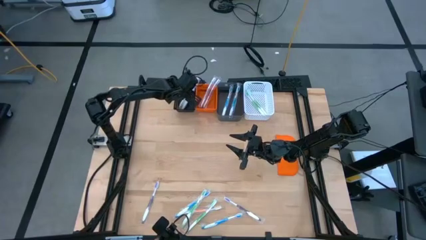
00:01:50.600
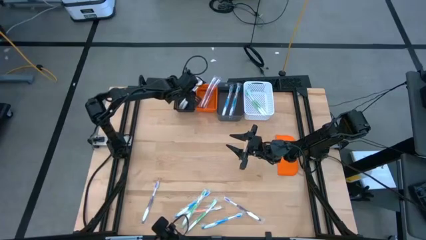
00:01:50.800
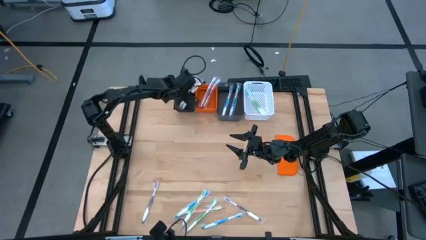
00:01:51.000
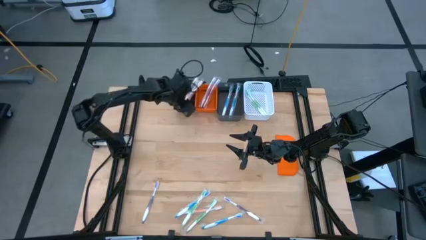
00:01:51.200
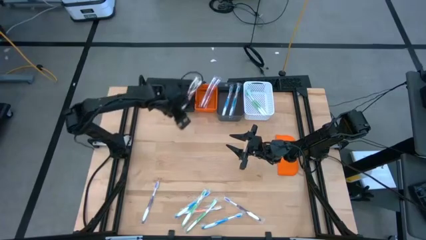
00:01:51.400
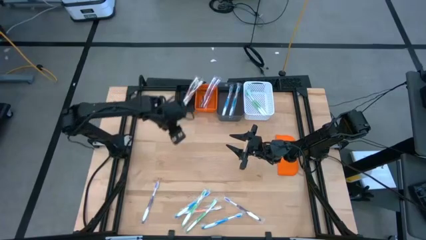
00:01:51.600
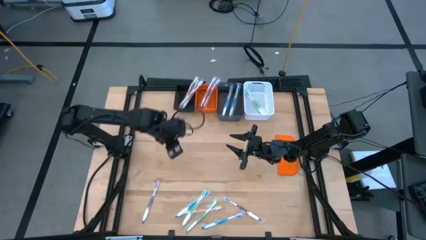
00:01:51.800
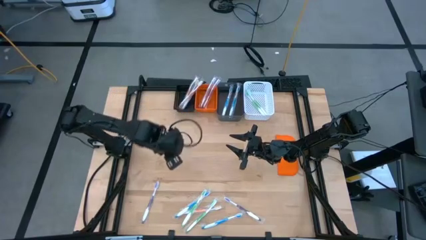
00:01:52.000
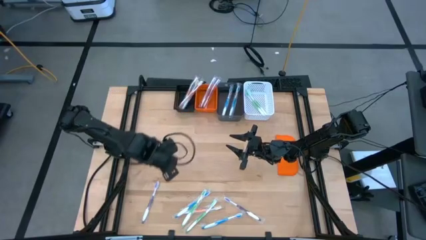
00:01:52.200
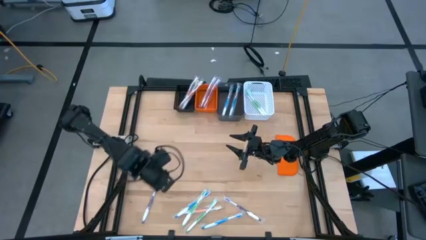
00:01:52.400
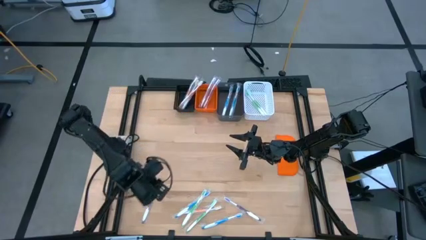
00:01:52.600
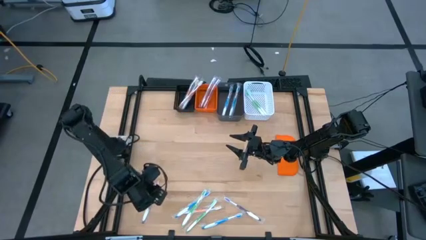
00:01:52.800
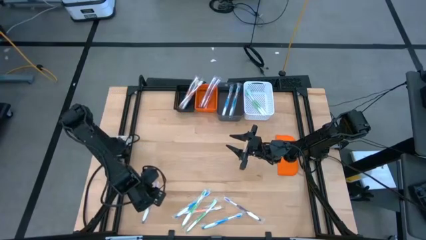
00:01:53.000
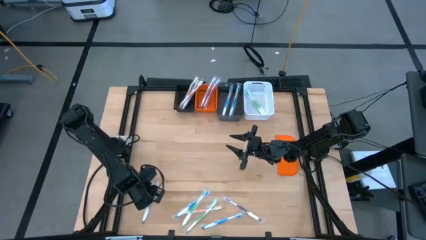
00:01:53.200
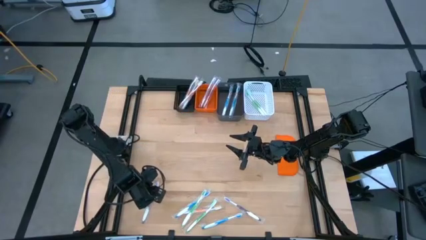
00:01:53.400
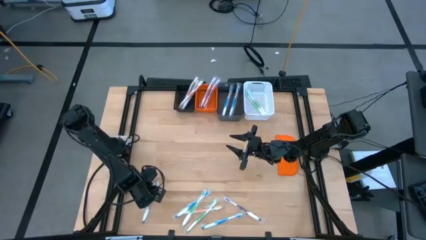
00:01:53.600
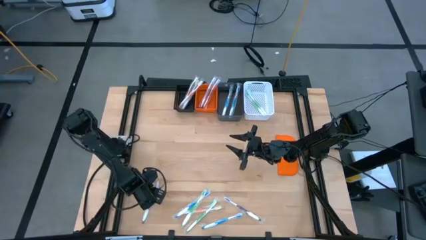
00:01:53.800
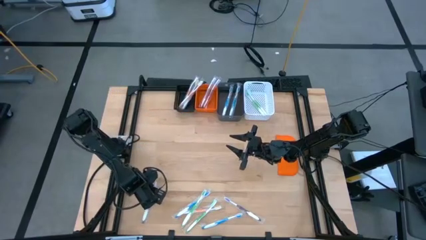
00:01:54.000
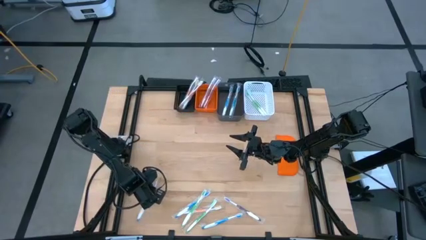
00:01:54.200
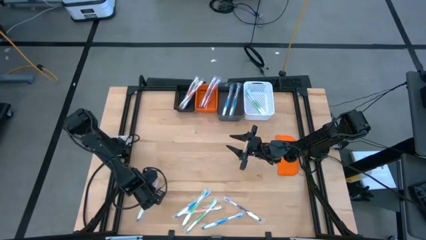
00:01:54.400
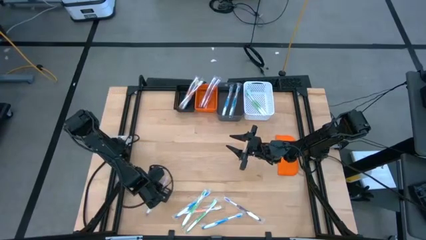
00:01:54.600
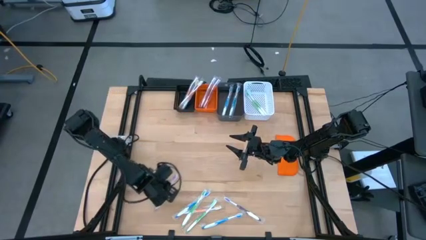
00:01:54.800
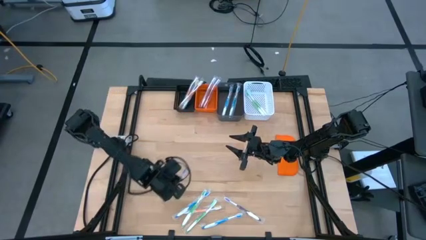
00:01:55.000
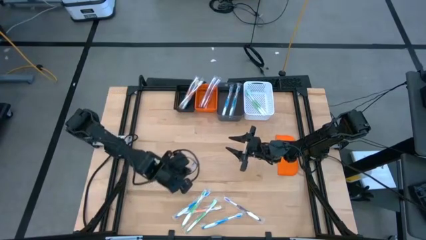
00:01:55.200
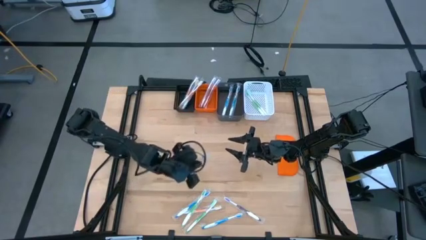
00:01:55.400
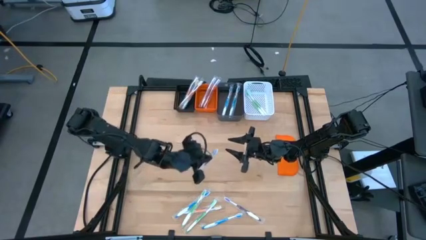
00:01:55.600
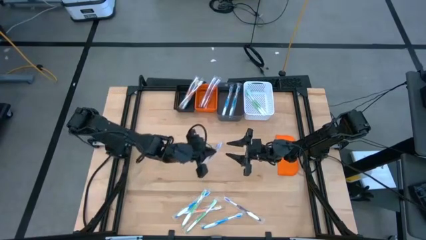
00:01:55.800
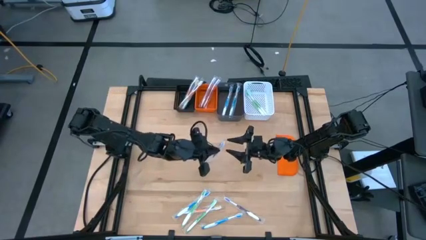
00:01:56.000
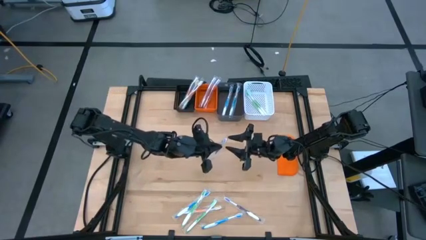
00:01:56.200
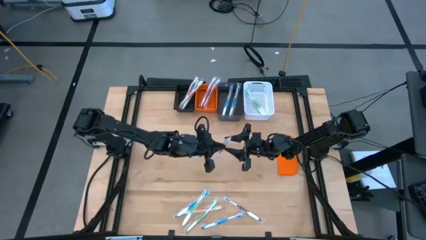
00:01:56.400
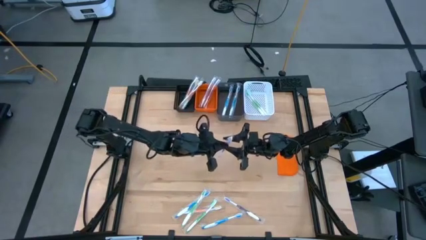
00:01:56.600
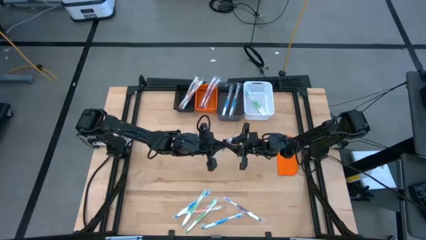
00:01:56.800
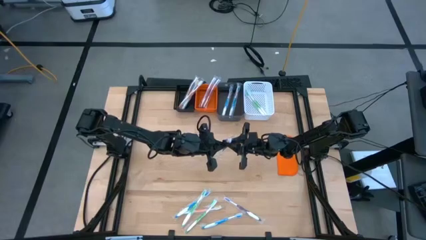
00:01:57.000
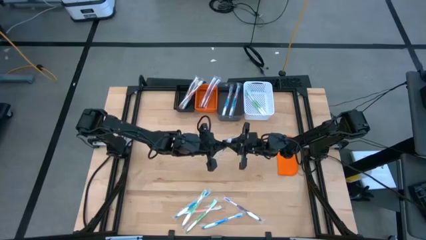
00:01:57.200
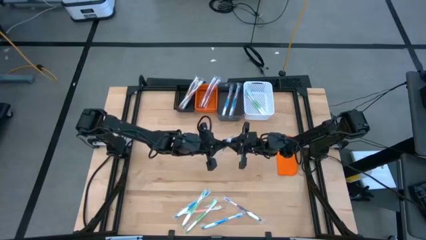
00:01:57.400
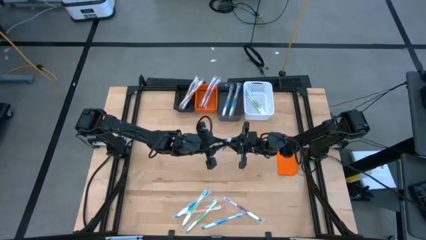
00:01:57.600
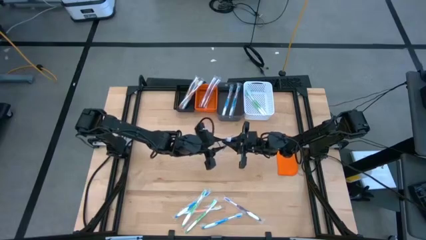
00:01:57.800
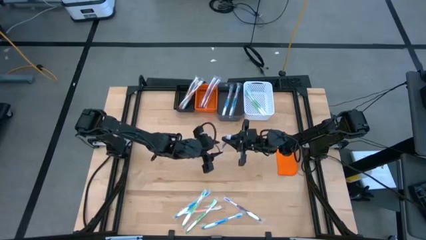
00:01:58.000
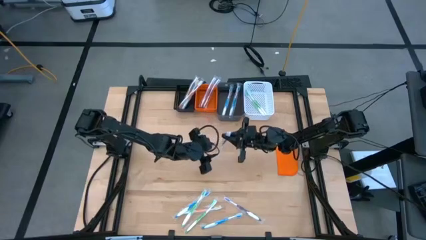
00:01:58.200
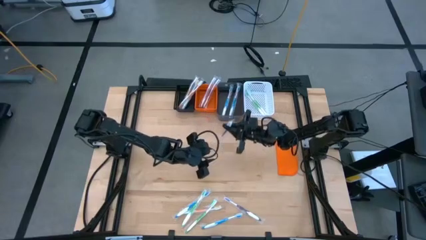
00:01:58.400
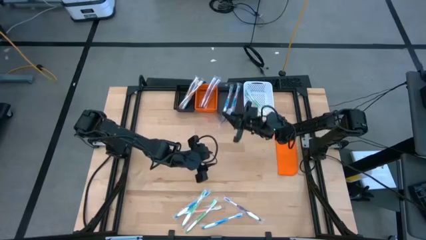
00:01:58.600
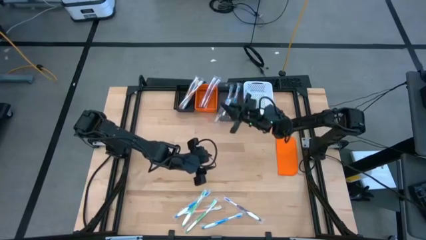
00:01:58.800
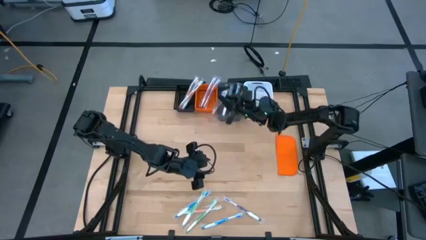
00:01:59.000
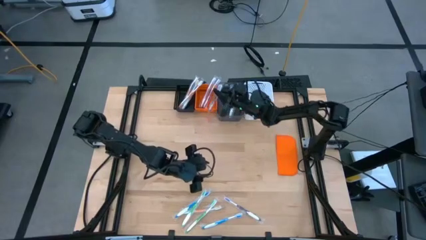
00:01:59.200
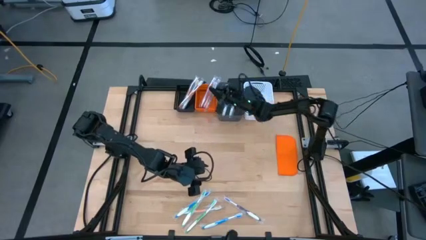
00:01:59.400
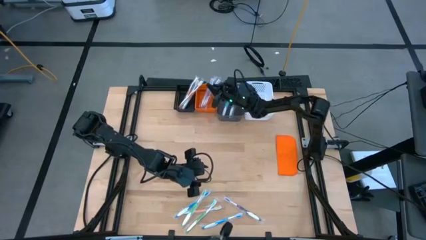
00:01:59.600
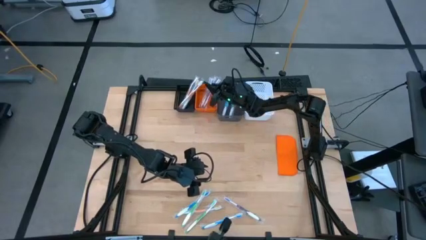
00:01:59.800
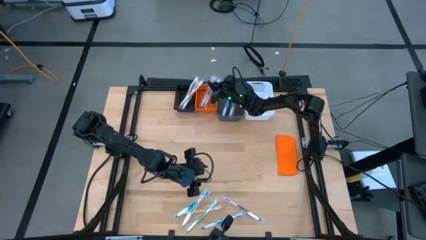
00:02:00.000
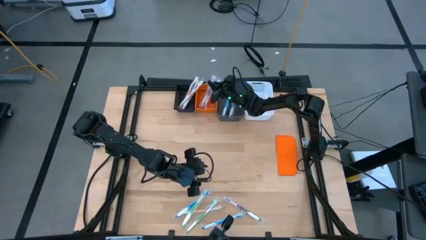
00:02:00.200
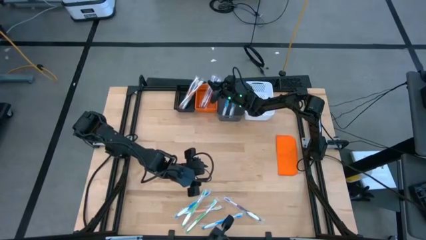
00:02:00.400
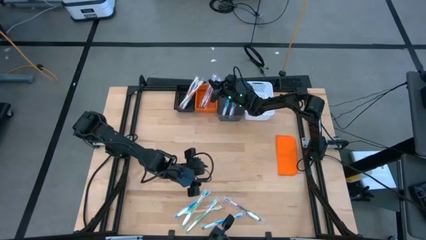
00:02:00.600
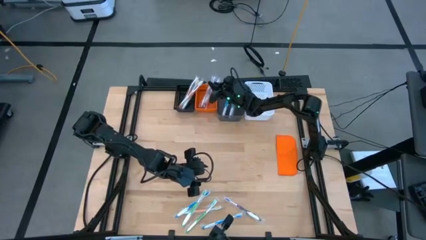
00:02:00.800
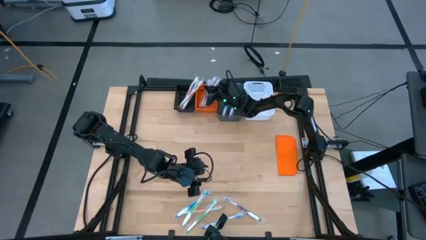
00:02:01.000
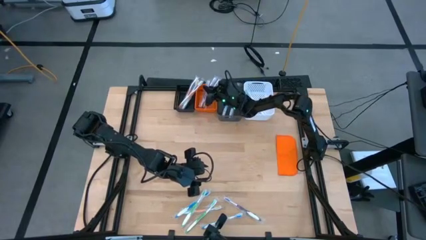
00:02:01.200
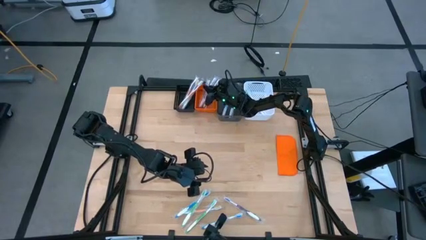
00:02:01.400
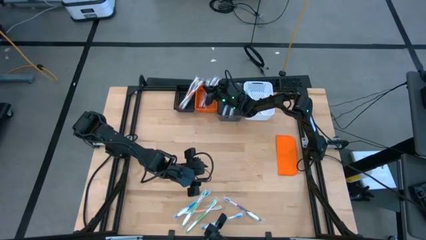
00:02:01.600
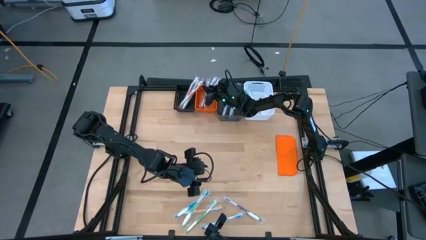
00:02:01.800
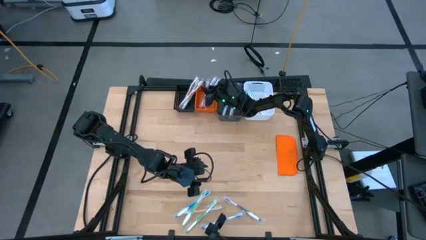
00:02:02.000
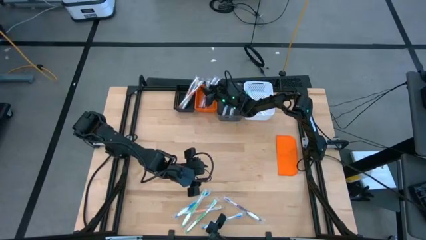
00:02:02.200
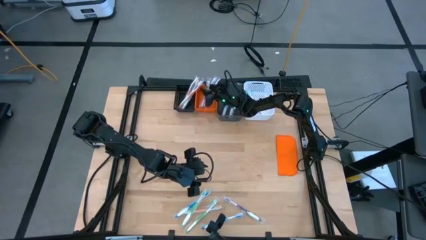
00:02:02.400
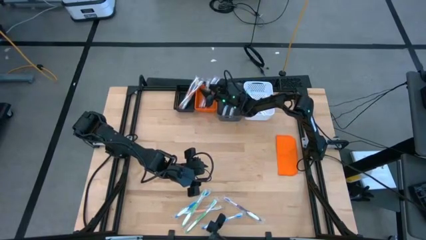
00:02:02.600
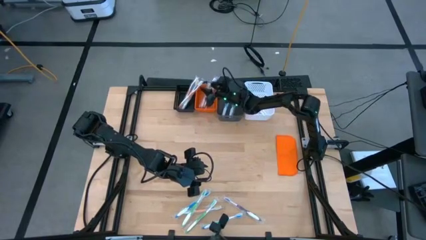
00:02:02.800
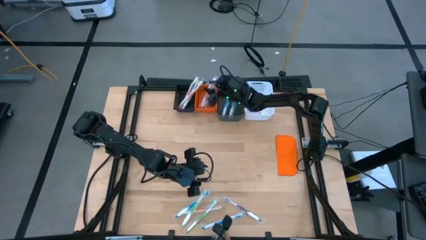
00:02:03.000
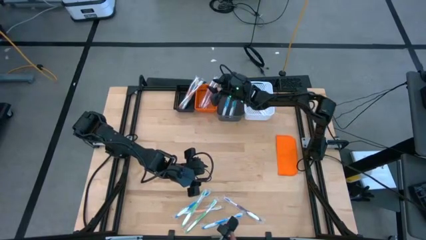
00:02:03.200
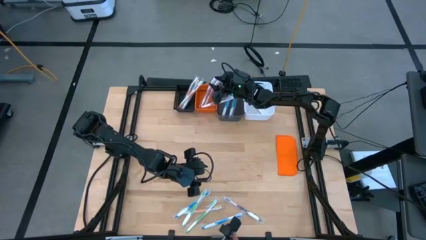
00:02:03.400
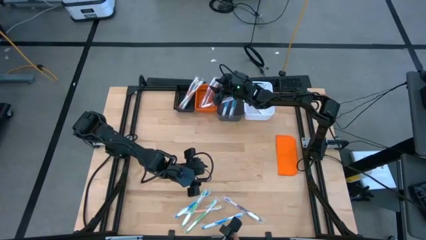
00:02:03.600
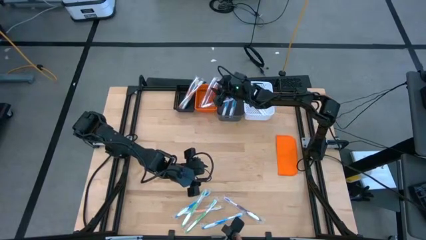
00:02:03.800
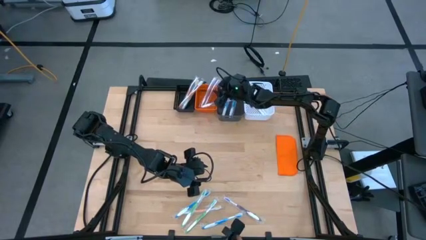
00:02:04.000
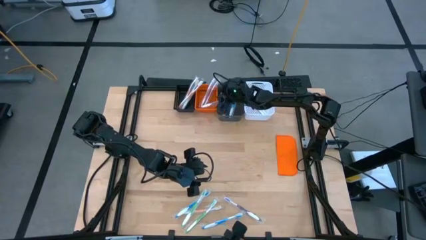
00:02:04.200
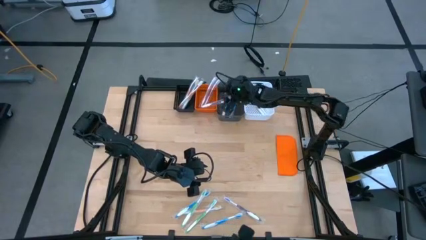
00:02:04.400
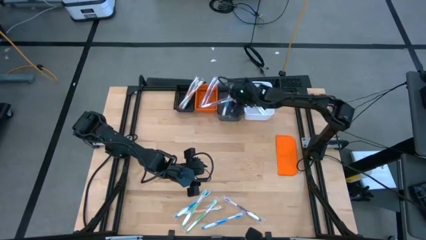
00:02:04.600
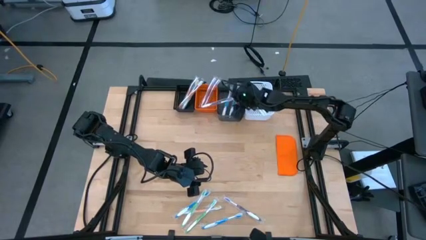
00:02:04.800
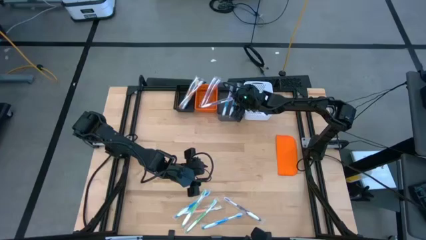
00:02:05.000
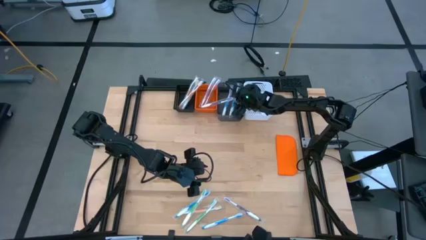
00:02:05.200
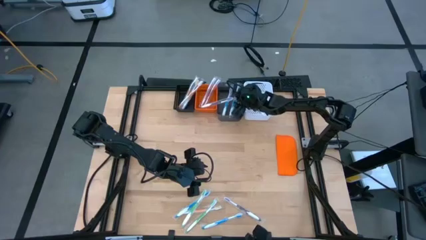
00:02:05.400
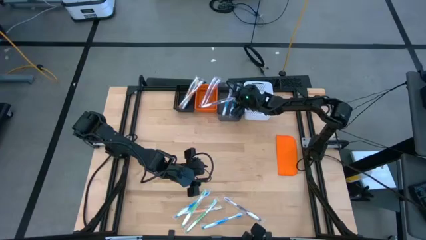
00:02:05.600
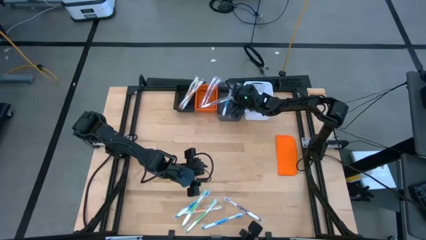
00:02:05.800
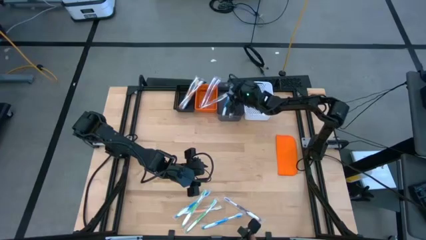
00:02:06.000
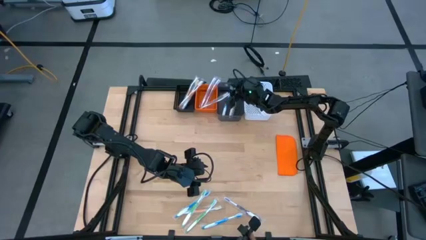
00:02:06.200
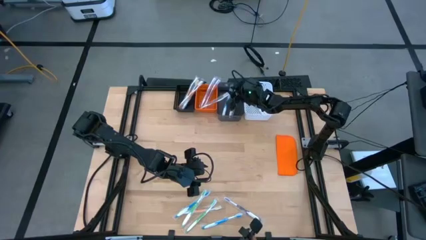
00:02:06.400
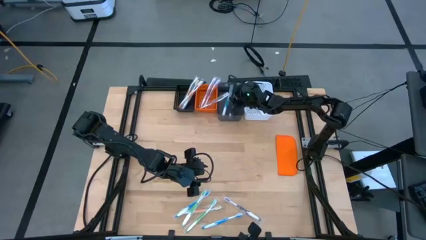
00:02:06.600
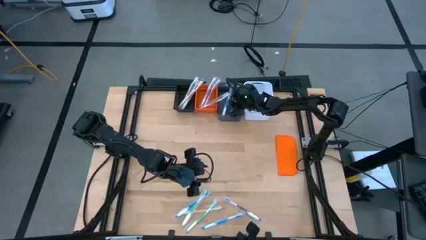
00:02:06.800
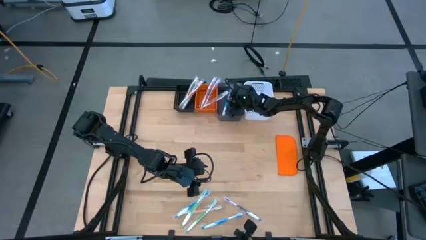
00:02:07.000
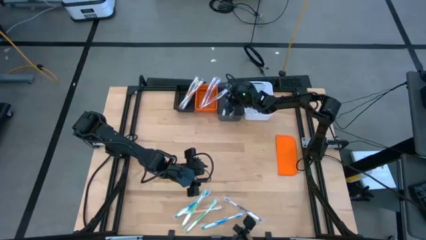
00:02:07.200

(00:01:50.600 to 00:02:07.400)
Task: Pick & Place Toothbrushes
Put the purple toothbrush into the orange bin
